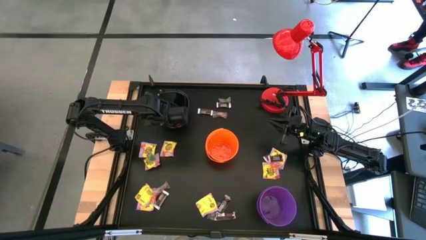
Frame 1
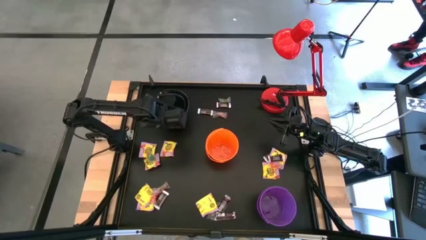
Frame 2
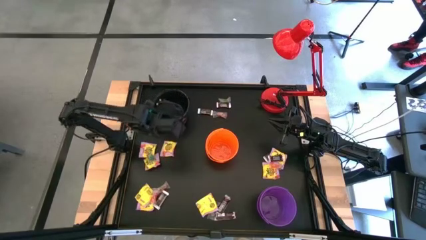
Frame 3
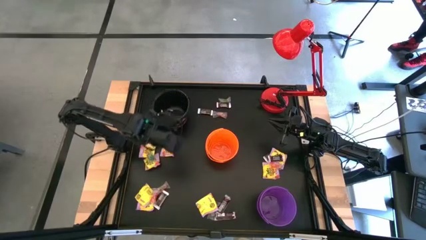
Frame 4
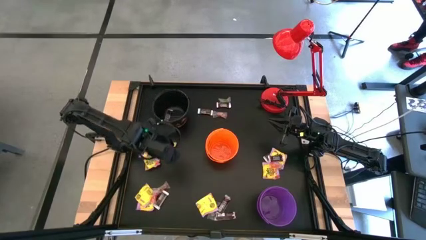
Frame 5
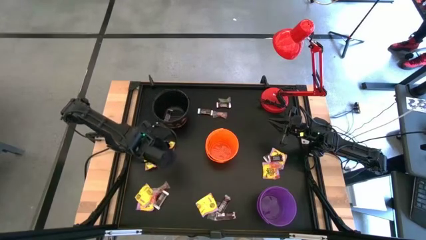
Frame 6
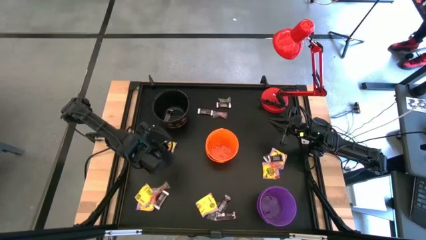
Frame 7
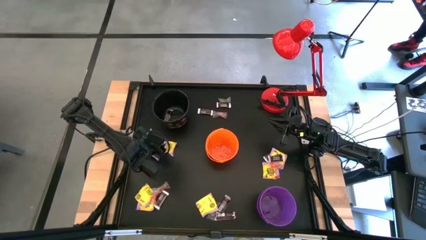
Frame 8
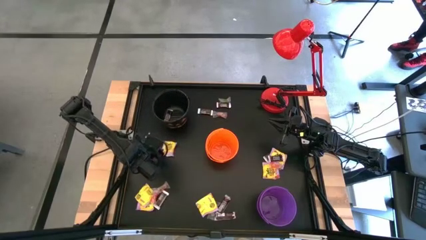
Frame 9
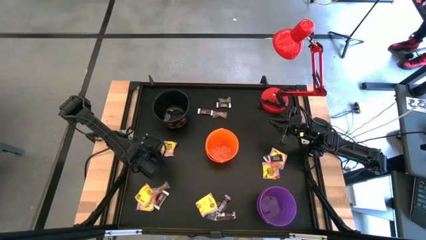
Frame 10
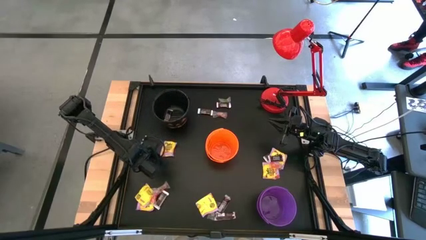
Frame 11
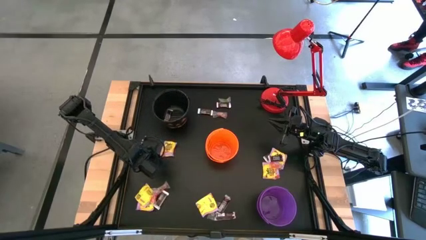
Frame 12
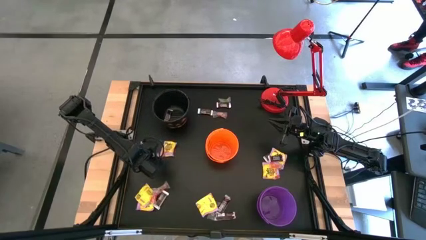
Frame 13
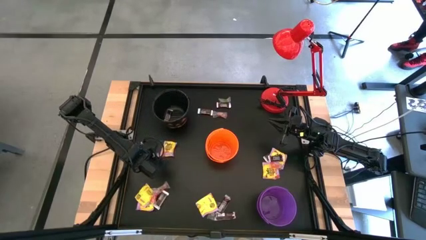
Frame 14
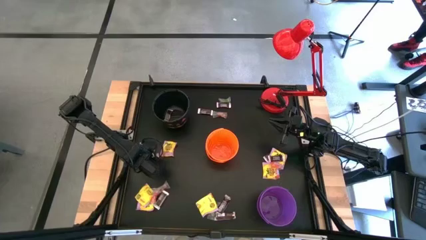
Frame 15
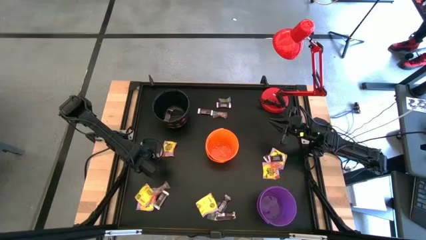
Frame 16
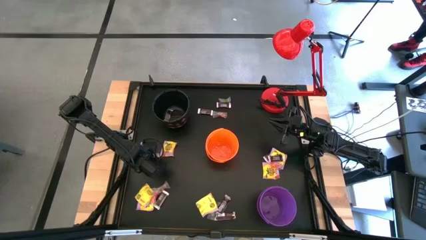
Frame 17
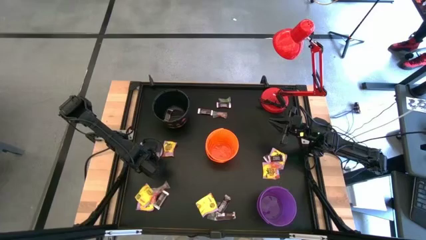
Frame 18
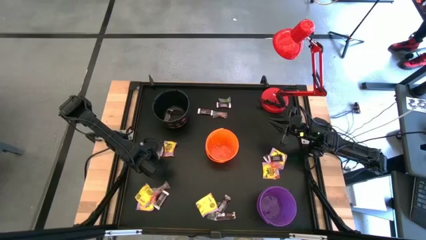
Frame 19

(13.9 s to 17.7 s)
Task: Sort candy
Put the blue gummy into the orange bucket

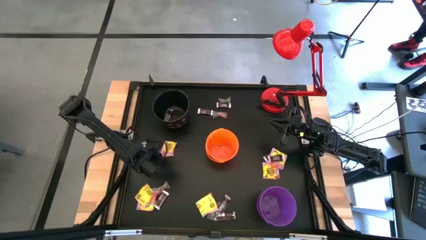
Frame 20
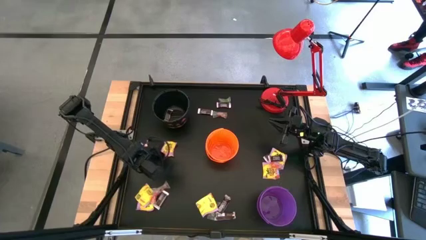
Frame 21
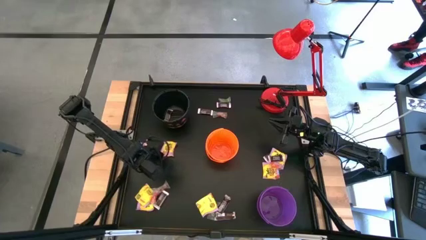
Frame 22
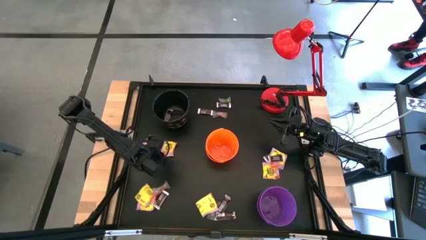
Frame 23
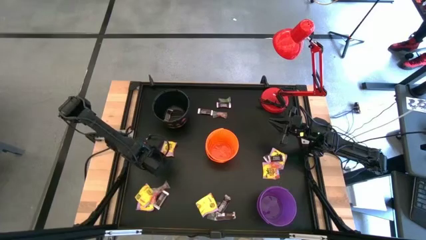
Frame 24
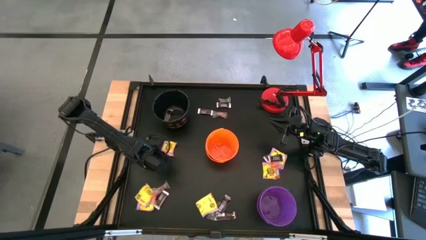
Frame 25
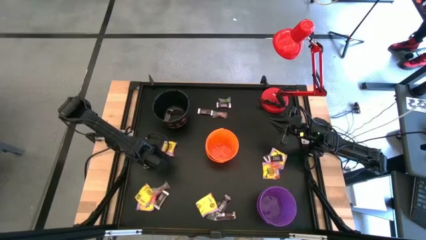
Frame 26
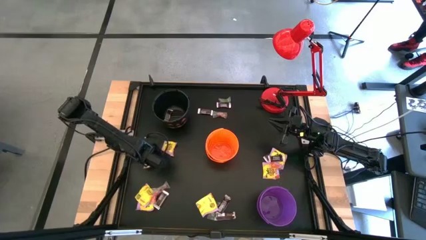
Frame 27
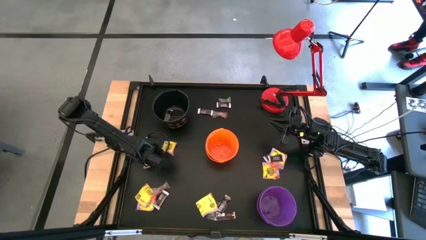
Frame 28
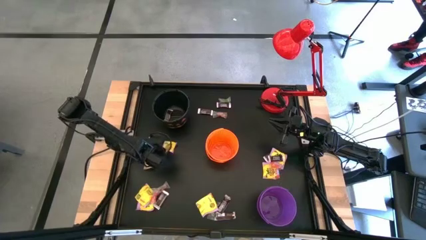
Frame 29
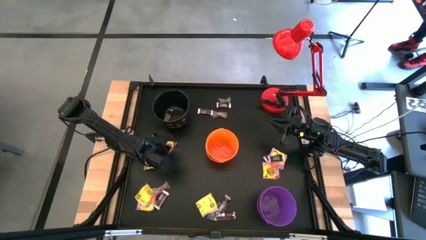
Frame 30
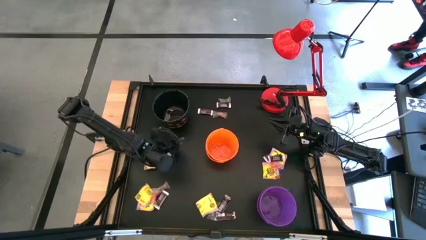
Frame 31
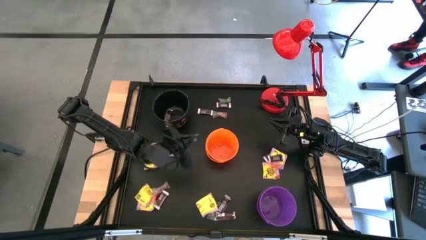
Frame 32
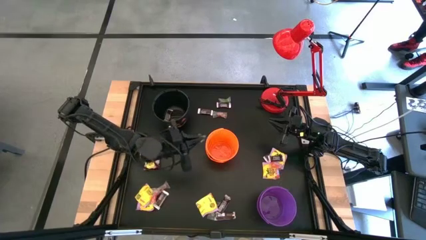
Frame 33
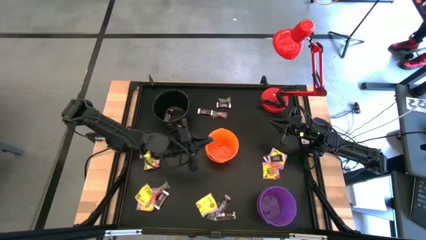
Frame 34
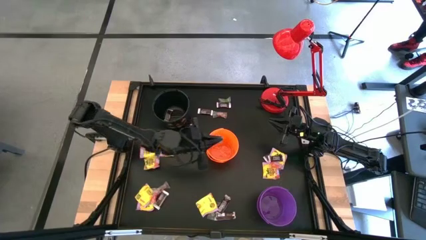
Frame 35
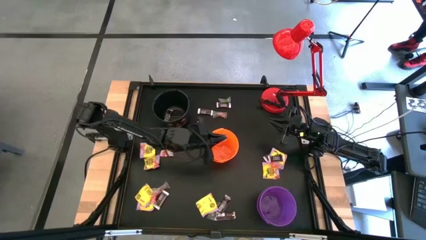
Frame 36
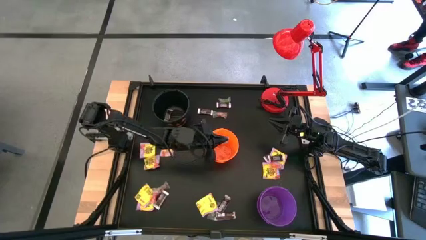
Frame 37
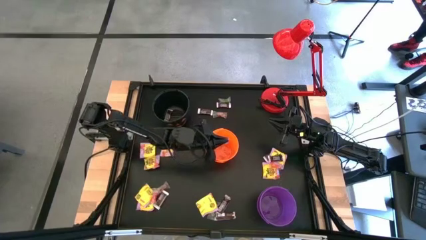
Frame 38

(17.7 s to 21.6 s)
Put the blue gummy into the orange bucket

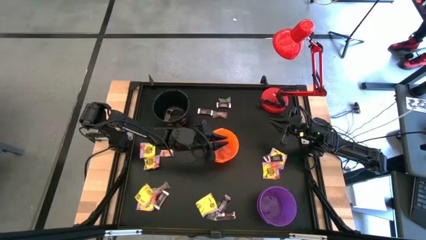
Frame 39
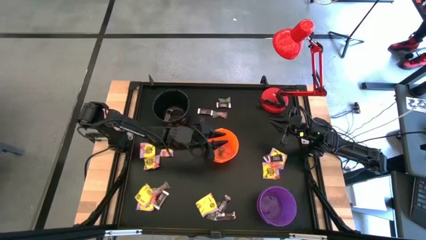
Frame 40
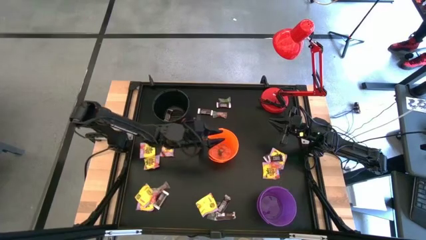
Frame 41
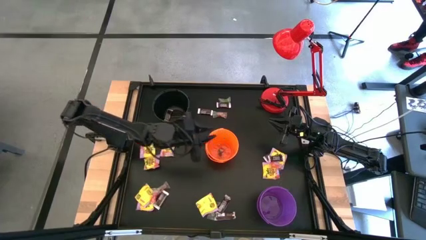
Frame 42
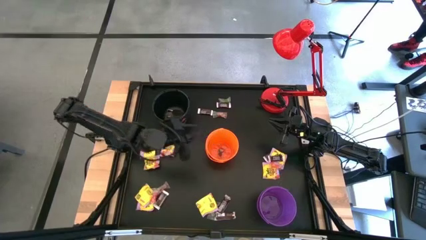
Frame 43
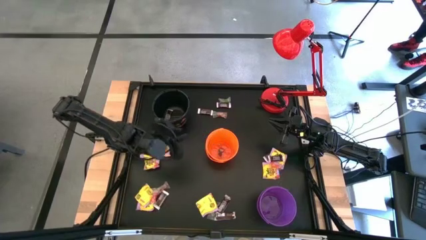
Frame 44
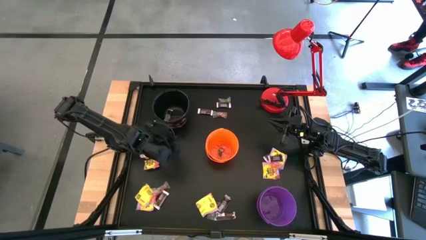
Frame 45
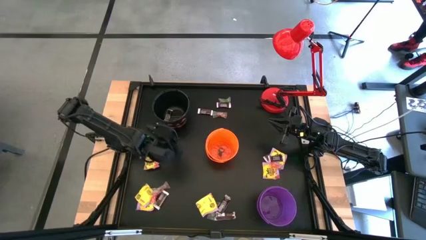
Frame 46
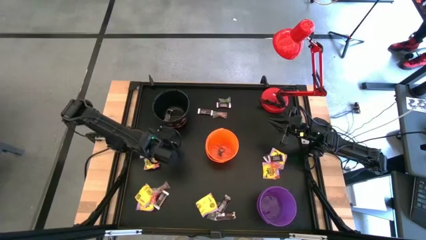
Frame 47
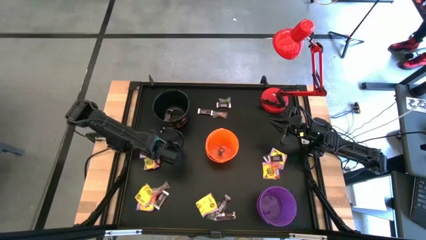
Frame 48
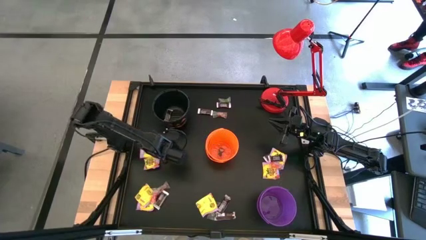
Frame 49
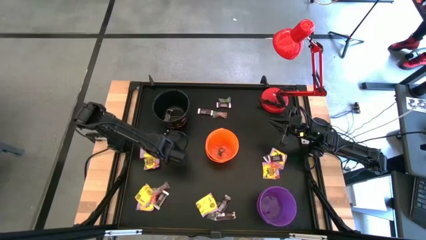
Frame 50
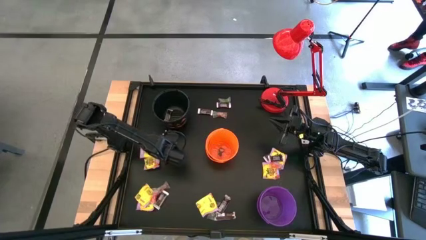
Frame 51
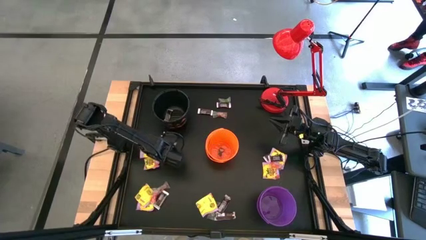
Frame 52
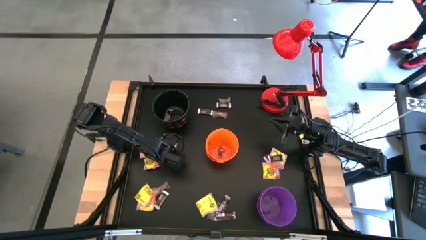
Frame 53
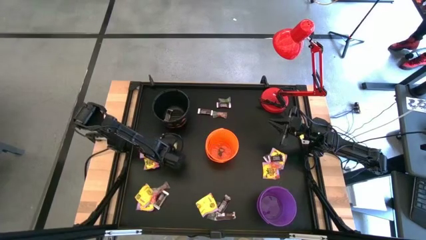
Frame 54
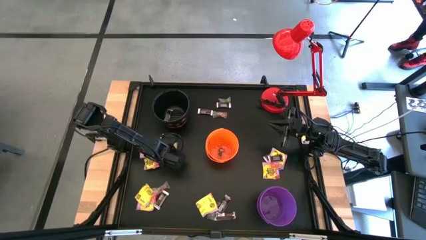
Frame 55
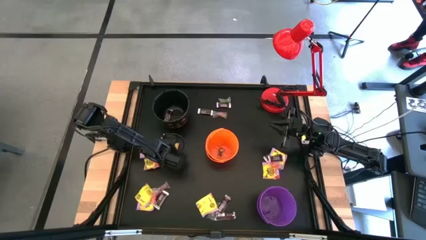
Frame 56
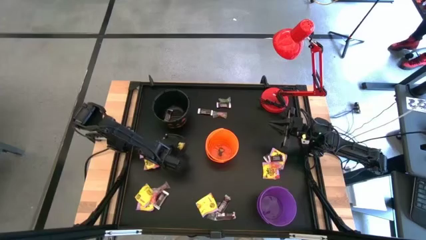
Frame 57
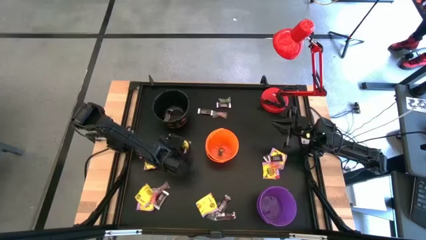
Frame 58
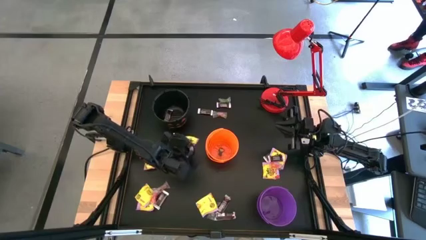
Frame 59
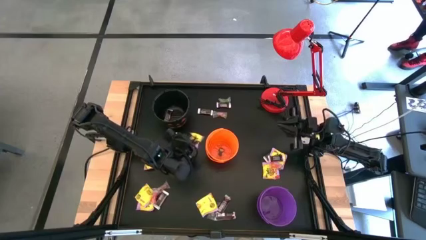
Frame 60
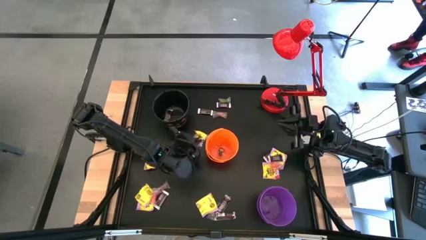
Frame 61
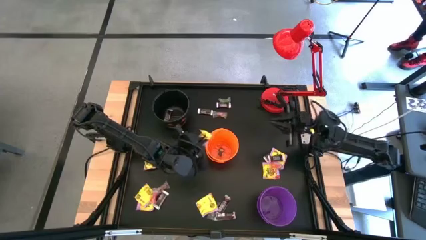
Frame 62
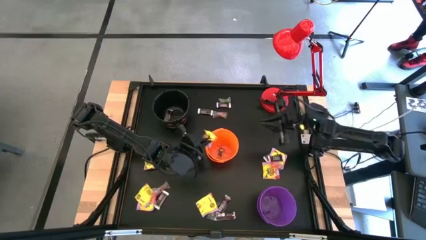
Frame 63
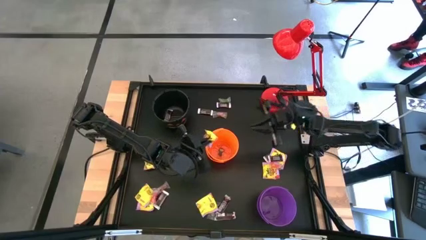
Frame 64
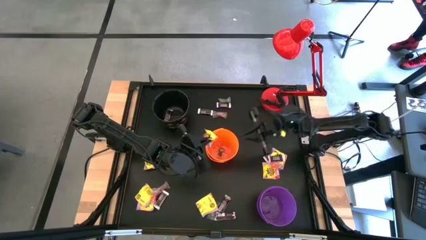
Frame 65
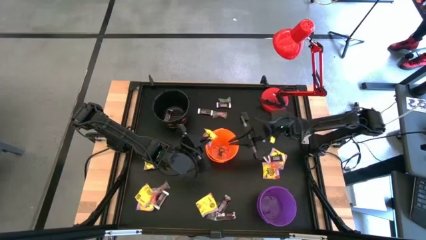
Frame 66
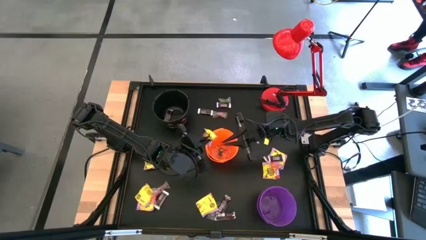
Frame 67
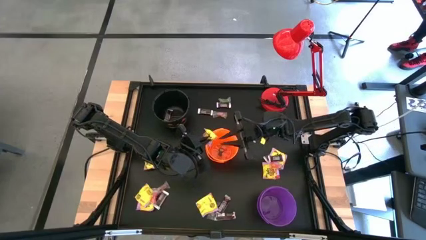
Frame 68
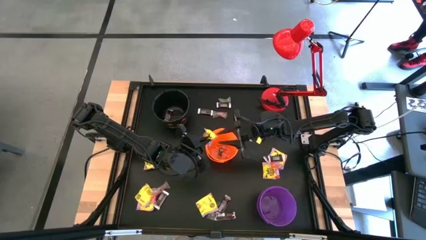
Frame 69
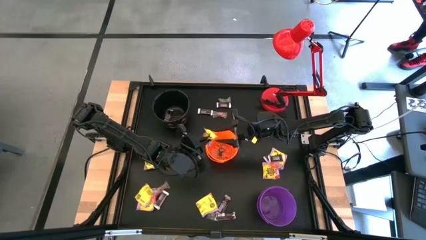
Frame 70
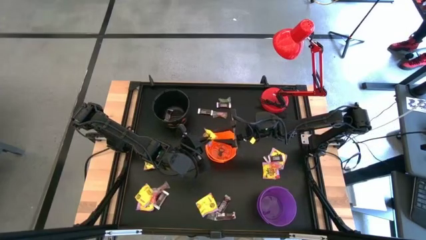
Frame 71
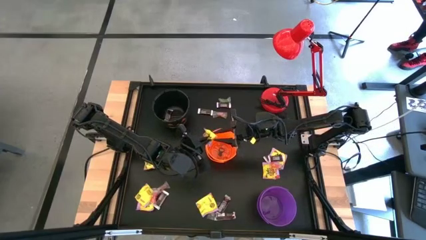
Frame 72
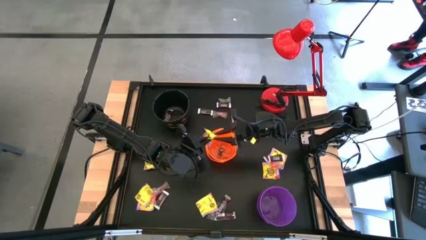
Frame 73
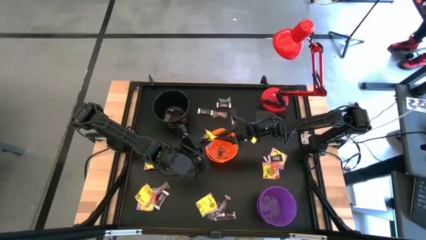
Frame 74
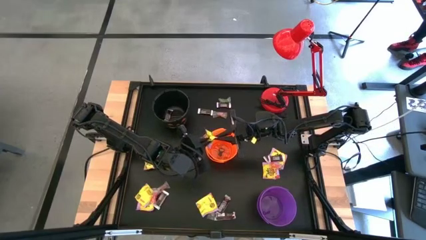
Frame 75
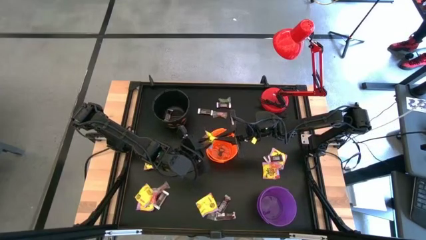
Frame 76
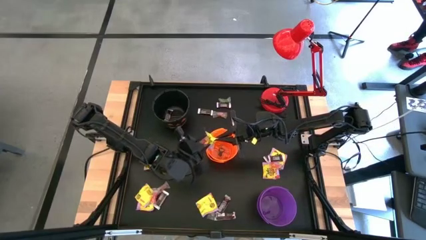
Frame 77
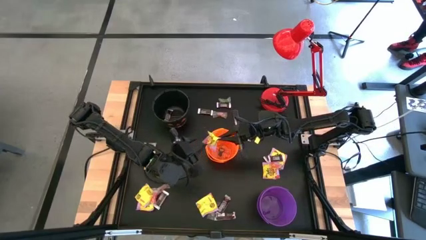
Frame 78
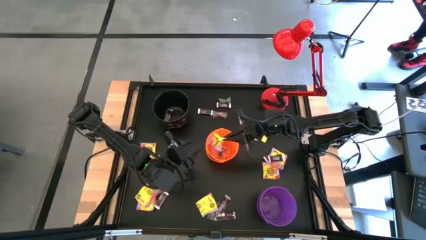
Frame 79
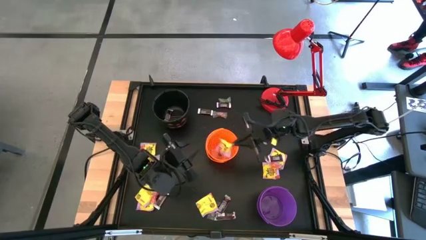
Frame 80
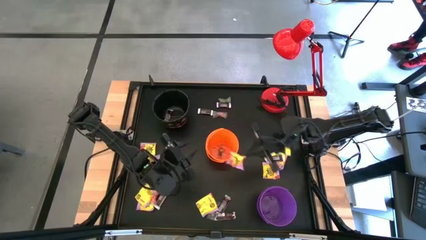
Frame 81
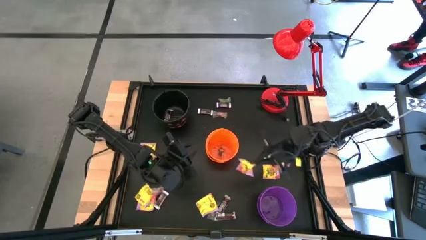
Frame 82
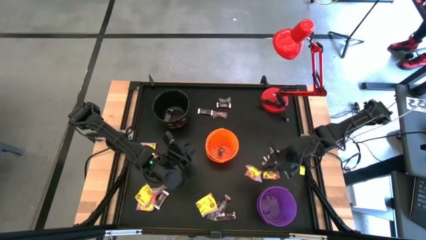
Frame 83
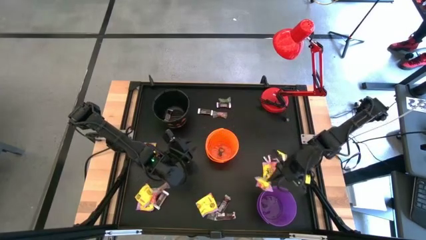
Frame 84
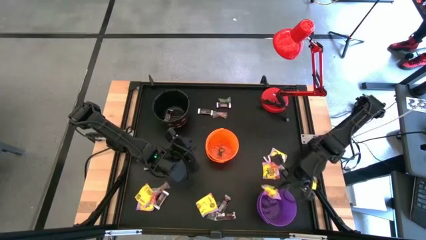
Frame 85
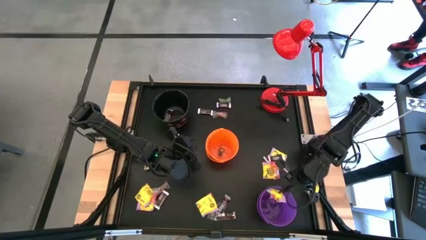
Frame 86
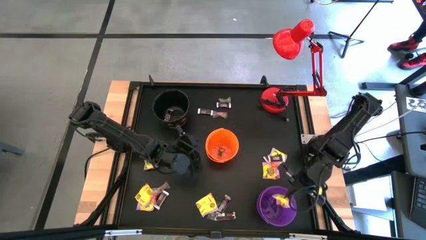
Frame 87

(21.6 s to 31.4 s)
Put the yellow candy into the purple bucket

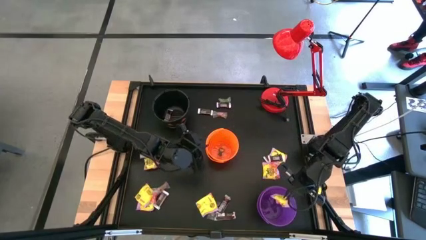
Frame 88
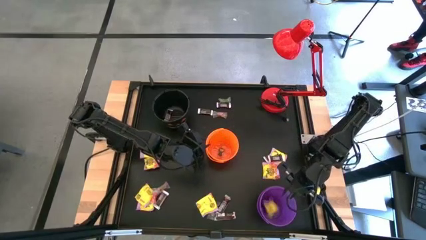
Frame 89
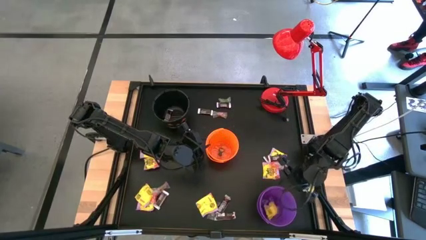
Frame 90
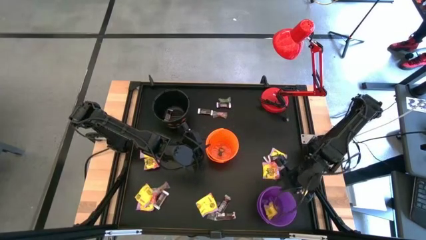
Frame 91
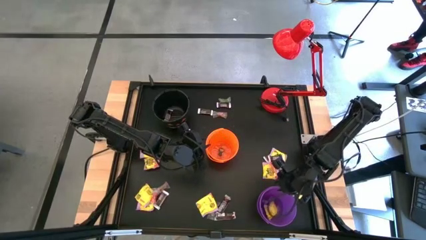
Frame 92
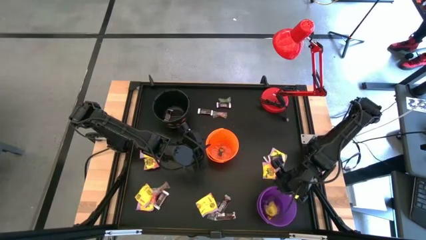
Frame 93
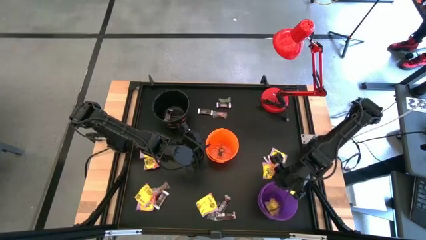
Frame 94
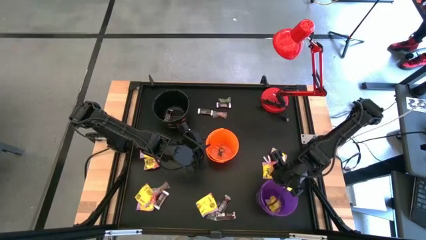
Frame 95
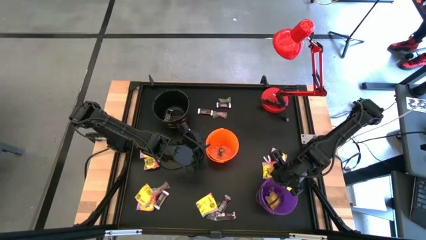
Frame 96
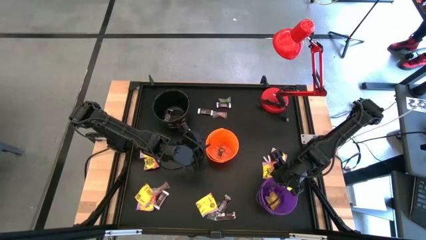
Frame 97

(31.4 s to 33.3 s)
Adjust the purple bucket
